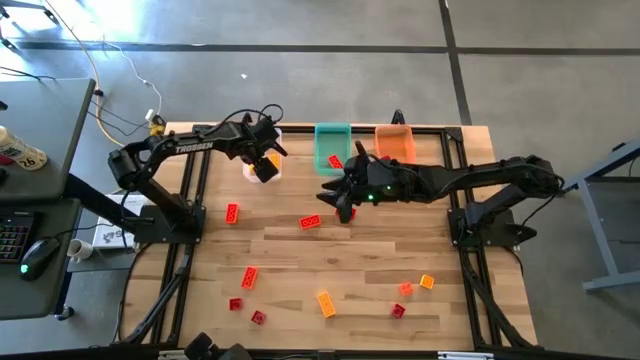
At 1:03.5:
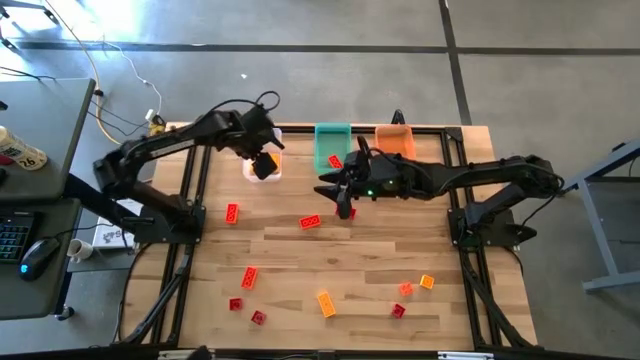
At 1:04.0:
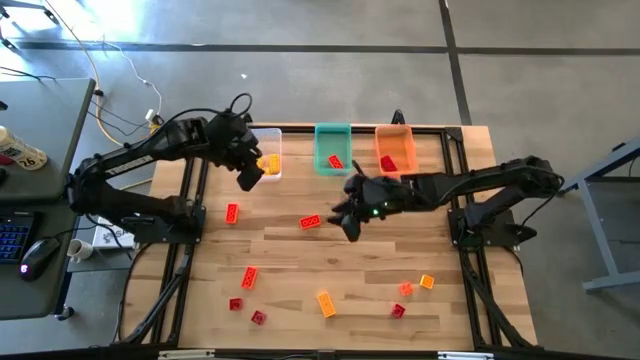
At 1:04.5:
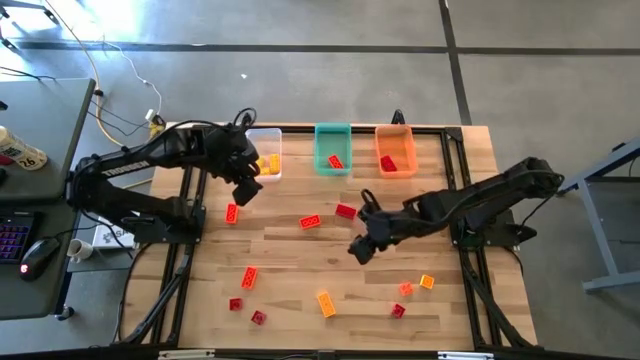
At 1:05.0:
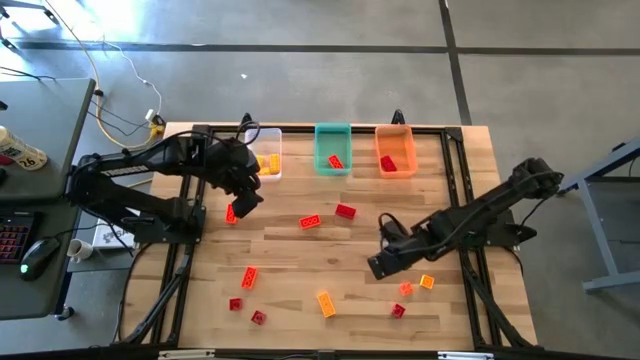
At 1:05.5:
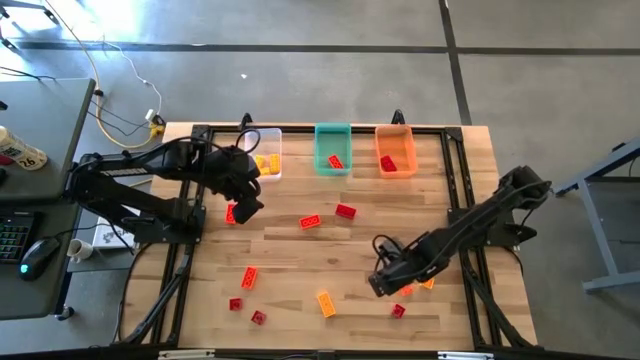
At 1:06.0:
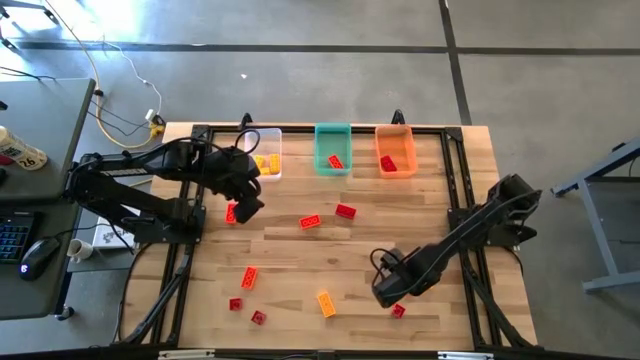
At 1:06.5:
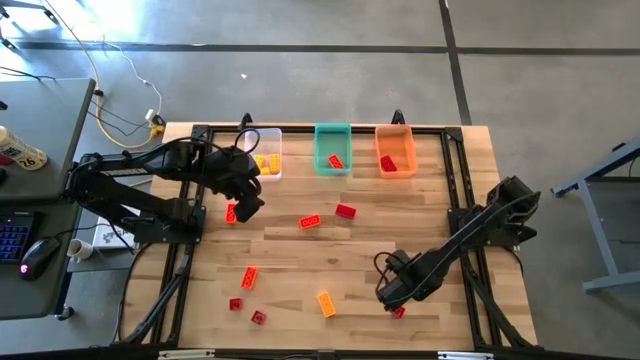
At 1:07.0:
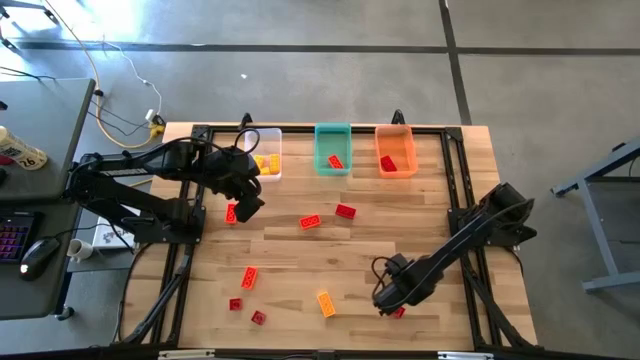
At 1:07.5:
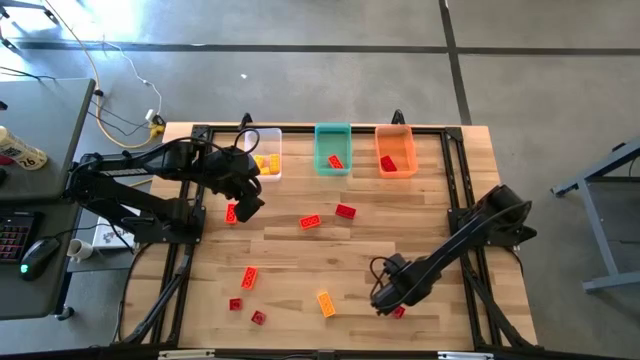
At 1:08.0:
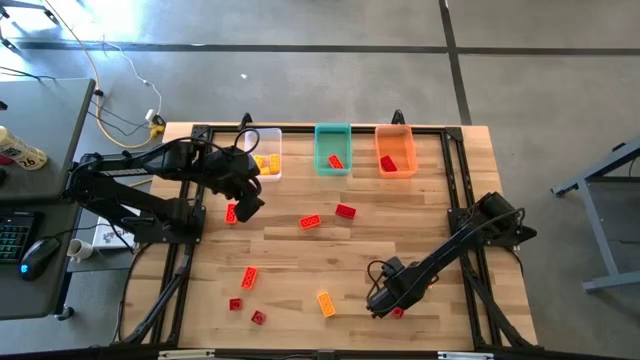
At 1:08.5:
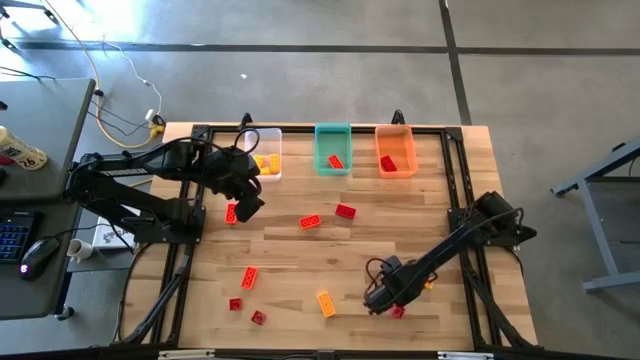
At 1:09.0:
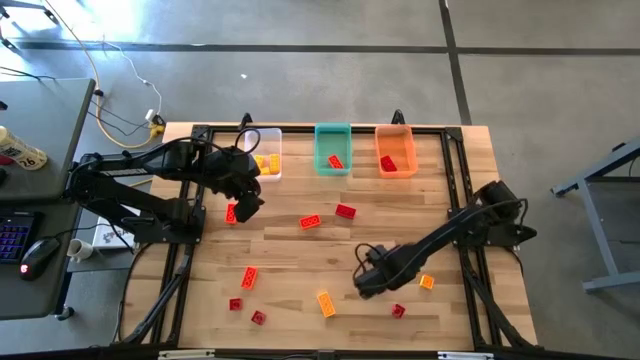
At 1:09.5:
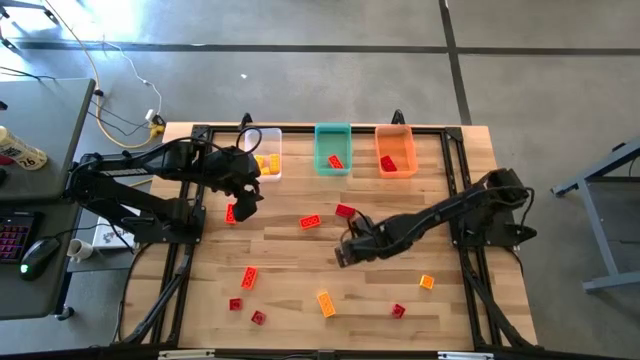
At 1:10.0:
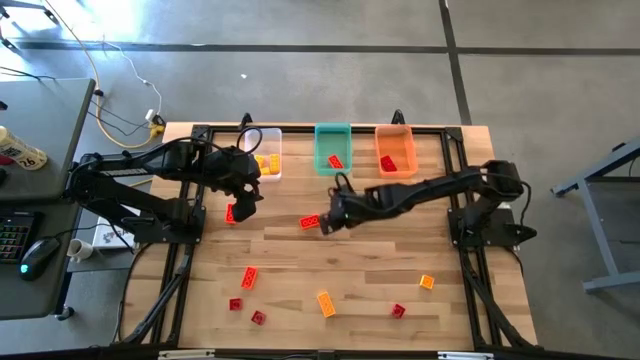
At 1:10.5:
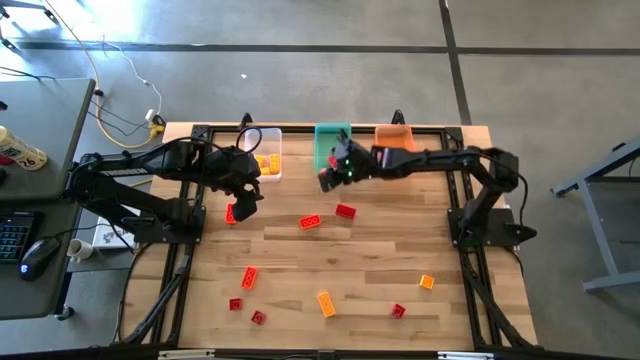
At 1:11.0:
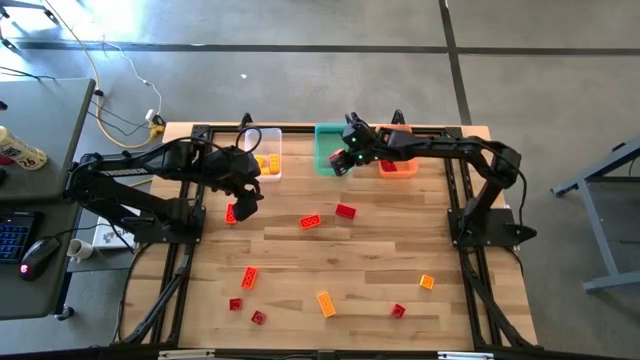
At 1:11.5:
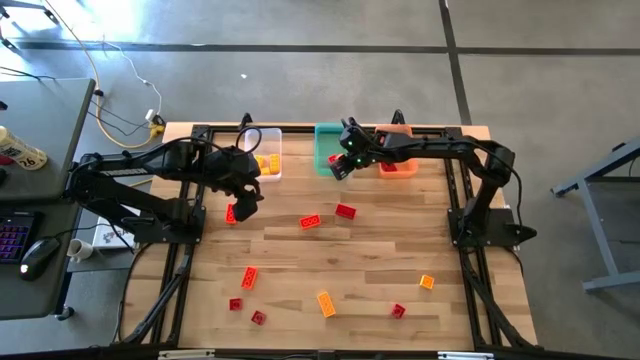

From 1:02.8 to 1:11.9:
Task: Sort & place blocks by color
Put the orange game piece into the blue bin

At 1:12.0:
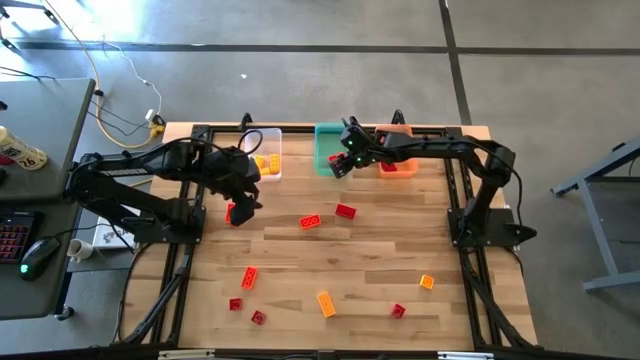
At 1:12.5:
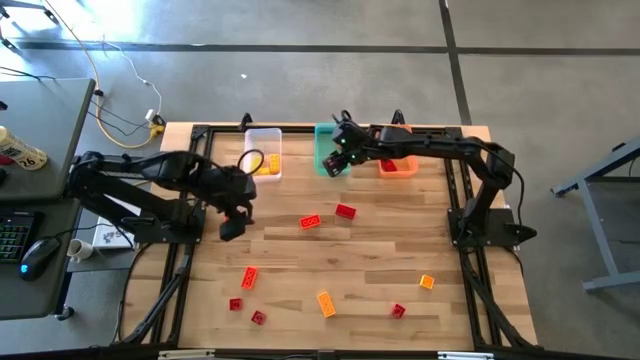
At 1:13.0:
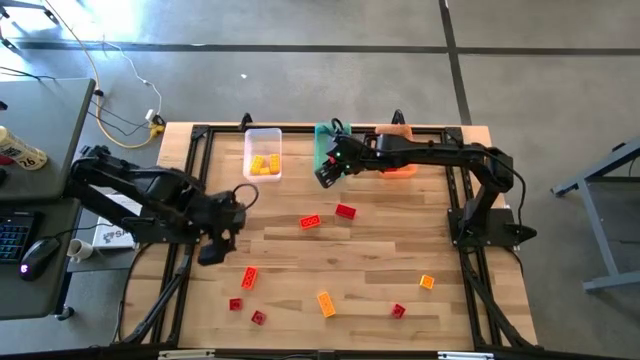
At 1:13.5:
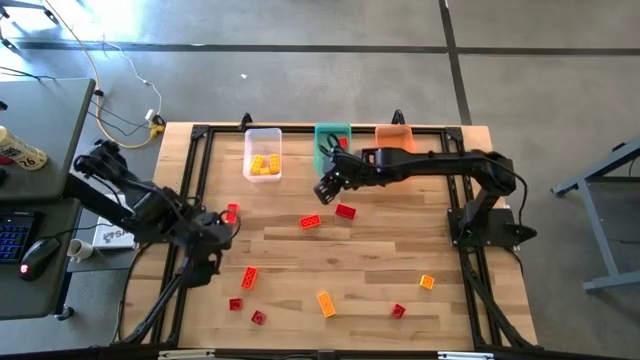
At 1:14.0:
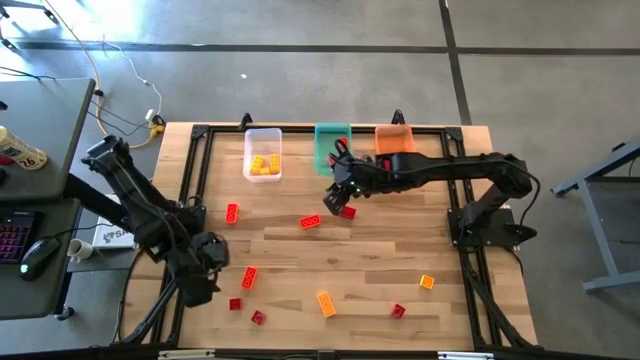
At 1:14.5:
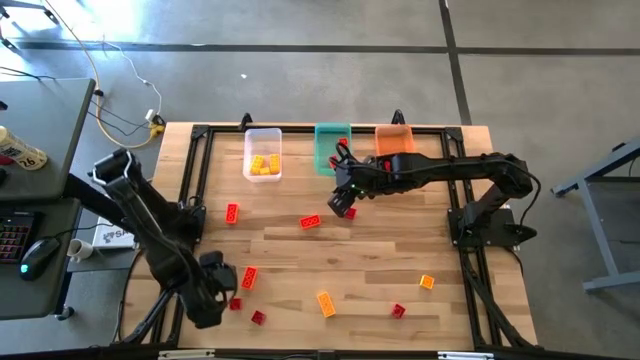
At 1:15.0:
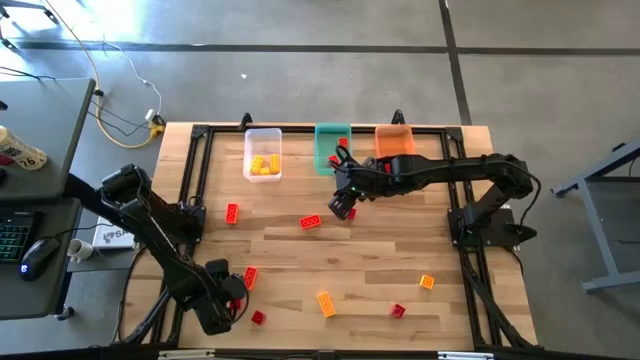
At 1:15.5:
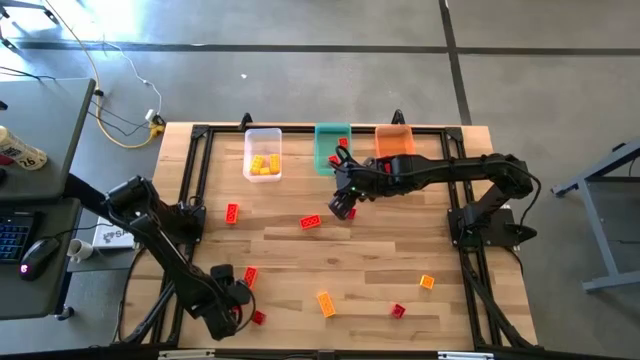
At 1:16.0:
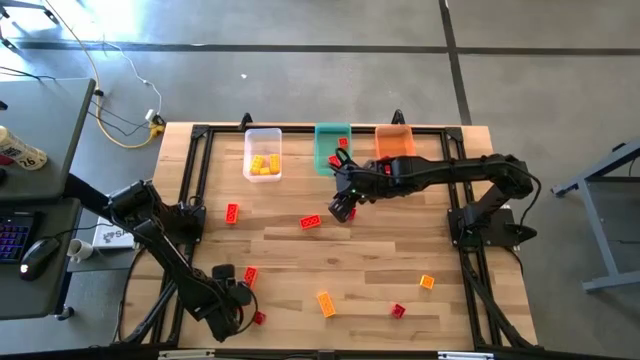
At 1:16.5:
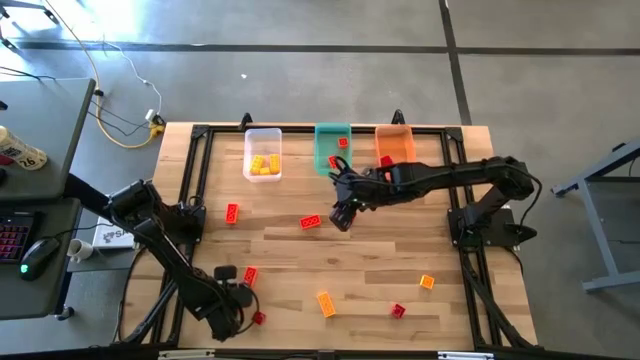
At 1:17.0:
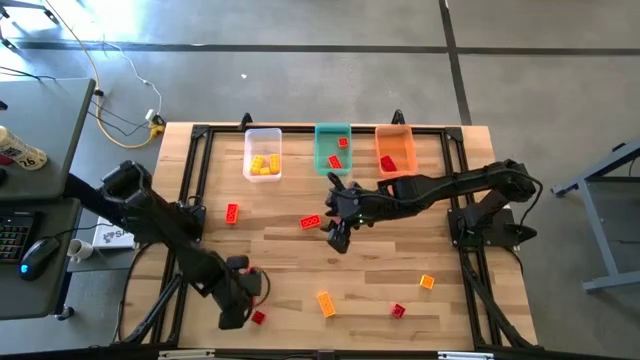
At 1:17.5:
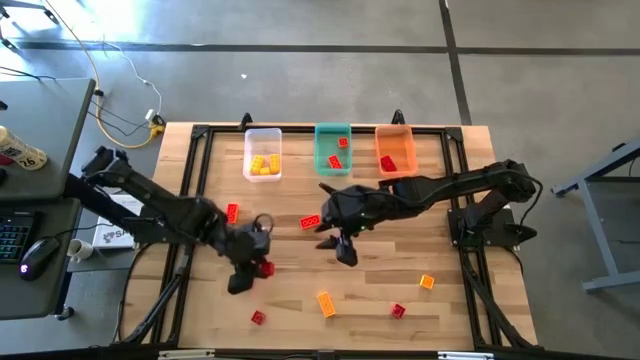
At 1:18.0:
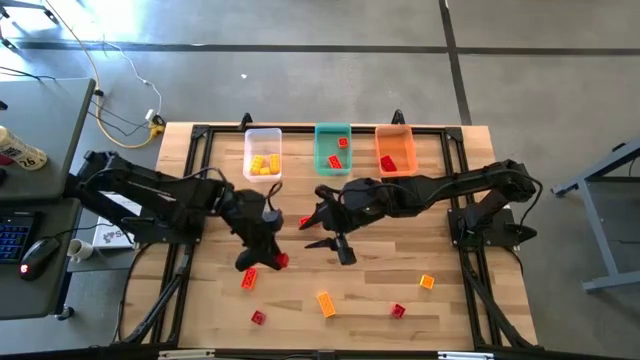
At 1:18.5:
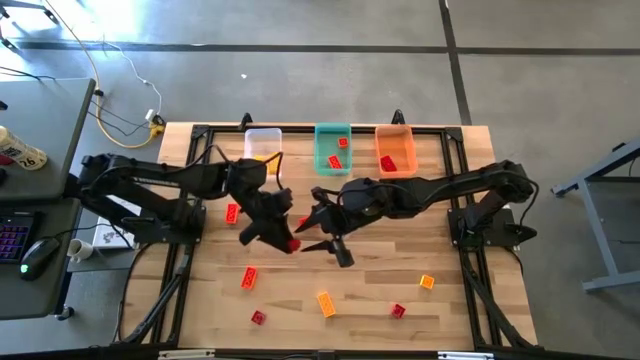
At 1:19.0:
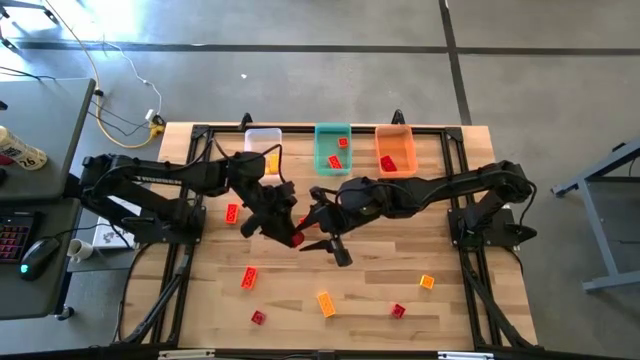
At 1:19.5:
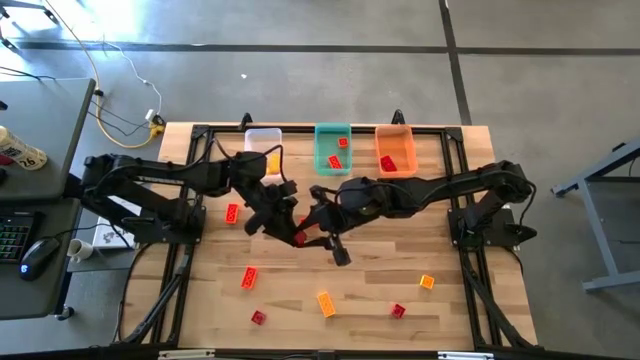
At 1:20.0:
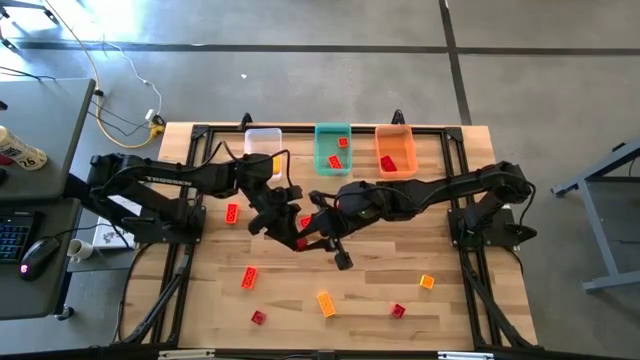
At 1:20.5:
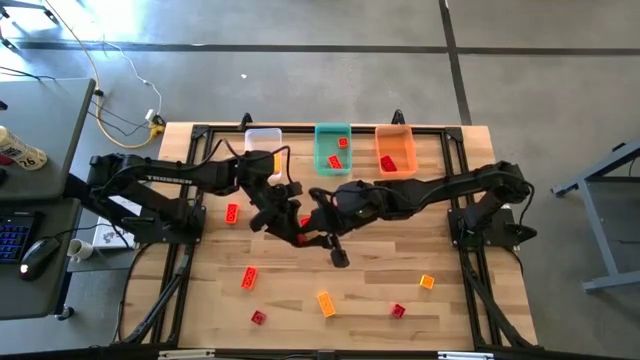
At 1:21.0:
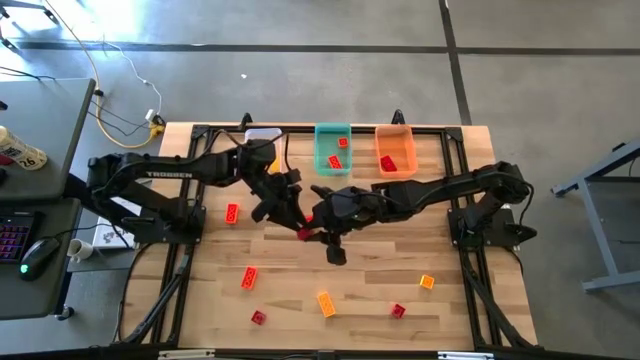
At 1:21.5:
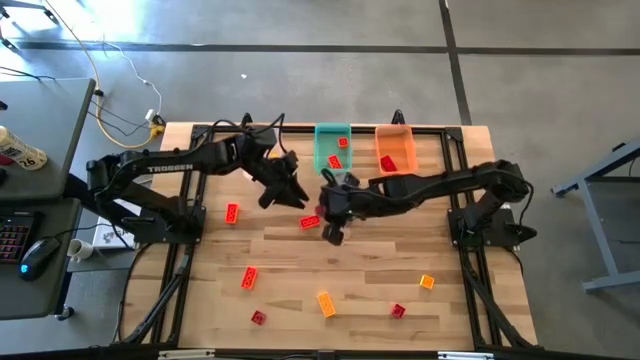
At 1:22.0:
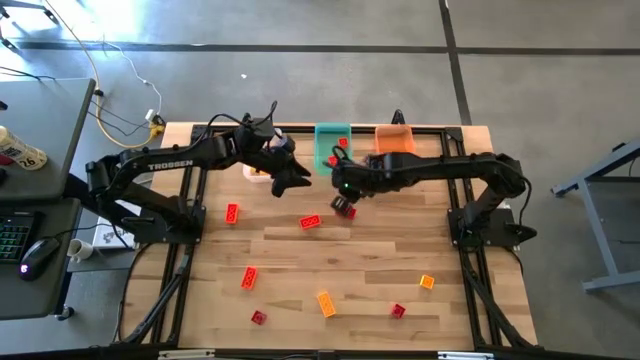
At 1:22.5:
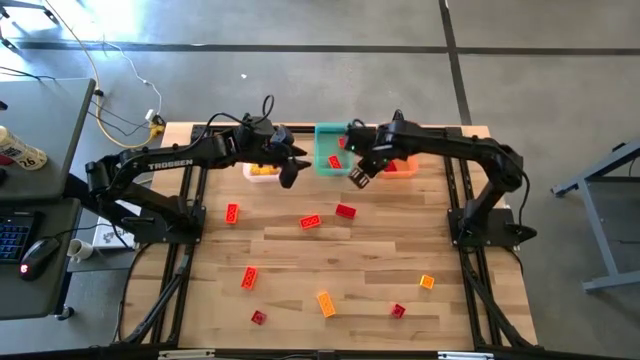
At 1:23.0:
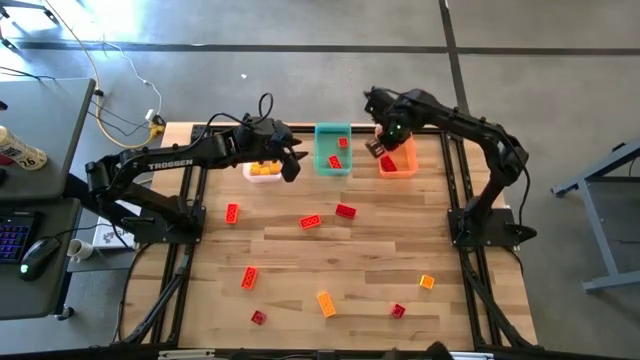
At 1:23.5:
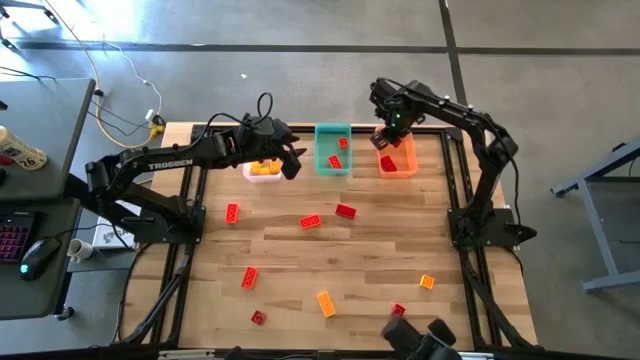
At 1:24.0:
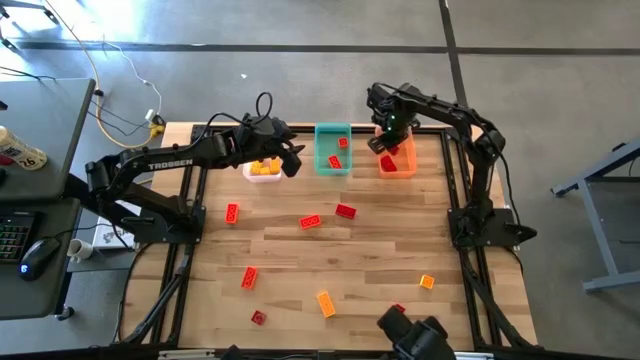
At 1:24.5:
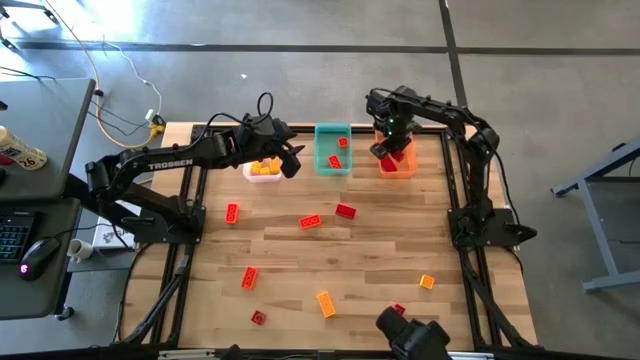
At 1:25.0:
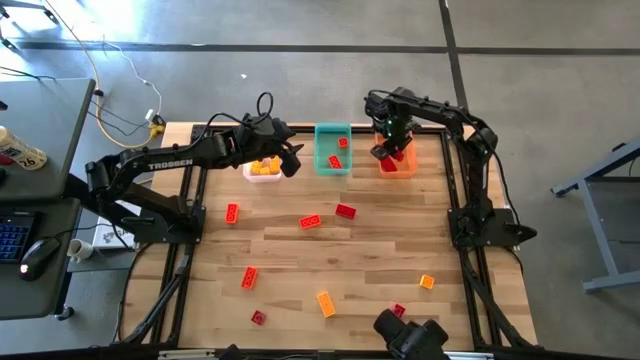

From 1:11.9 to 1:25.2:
Put the bottom left red game piece into the orange bin
